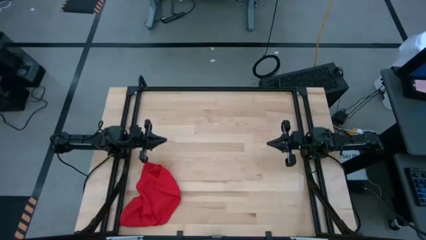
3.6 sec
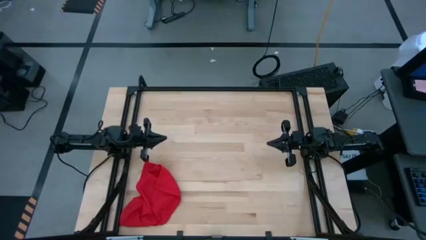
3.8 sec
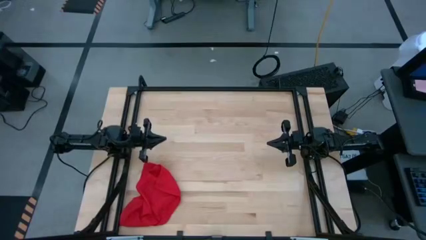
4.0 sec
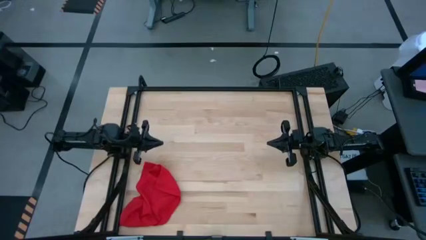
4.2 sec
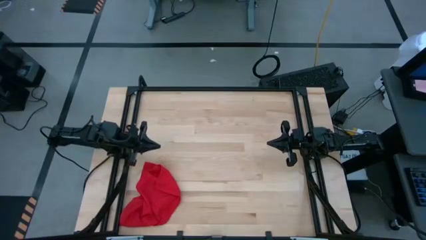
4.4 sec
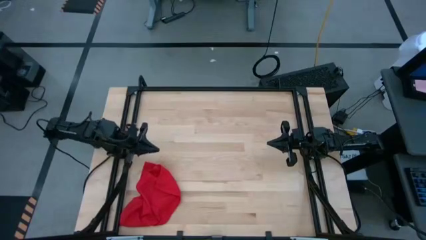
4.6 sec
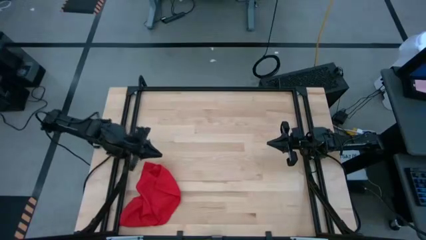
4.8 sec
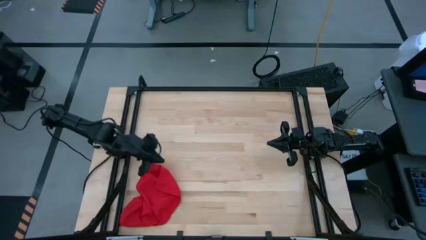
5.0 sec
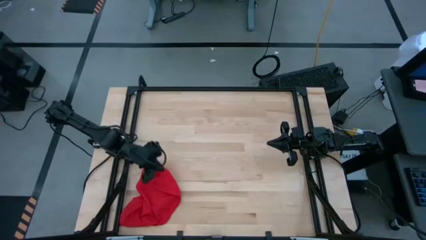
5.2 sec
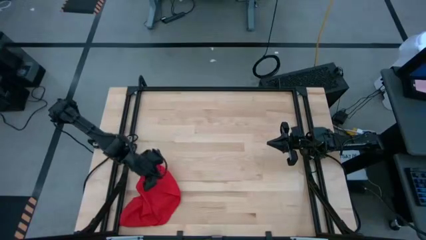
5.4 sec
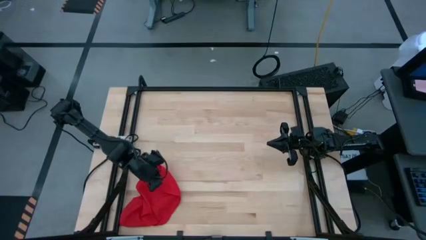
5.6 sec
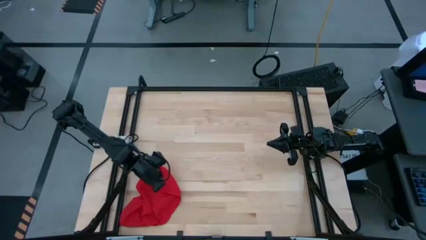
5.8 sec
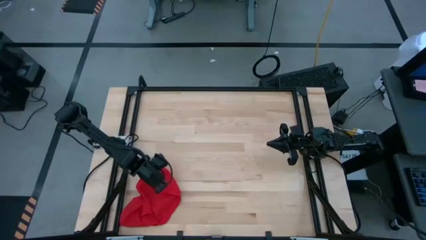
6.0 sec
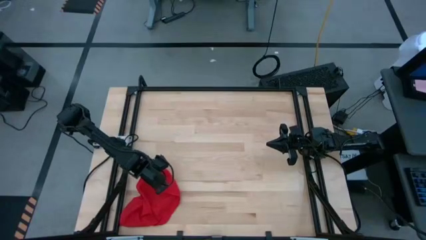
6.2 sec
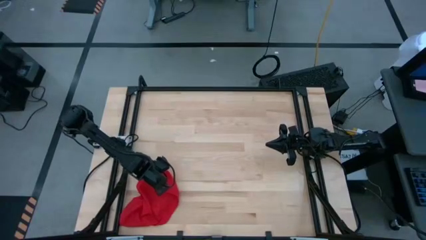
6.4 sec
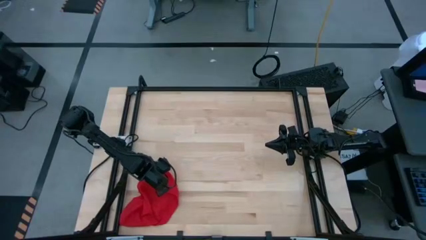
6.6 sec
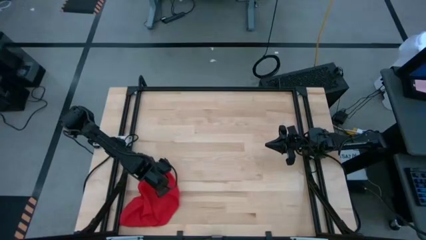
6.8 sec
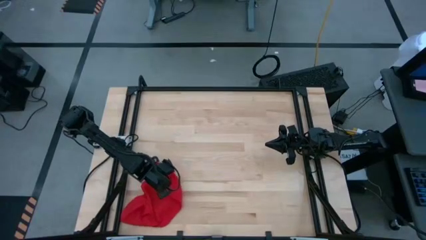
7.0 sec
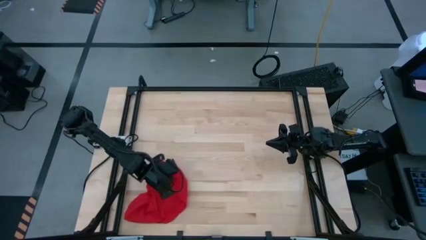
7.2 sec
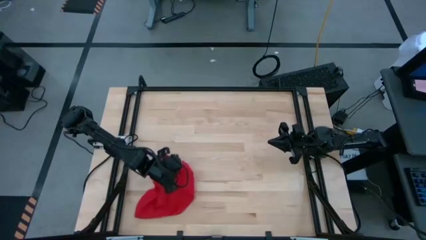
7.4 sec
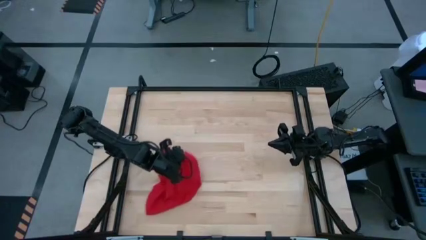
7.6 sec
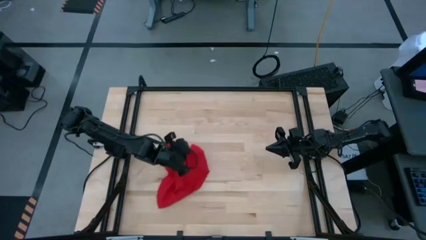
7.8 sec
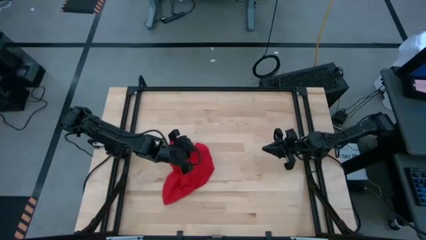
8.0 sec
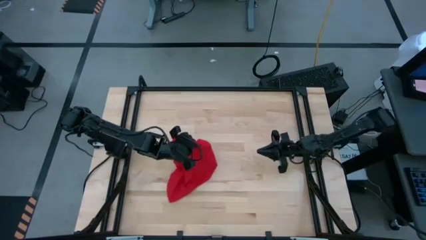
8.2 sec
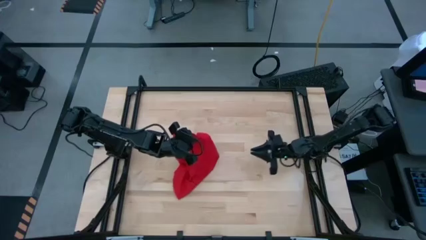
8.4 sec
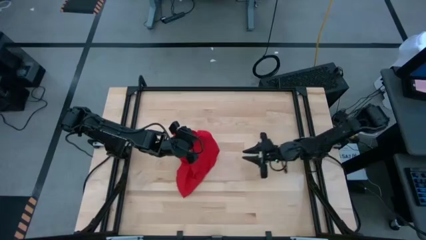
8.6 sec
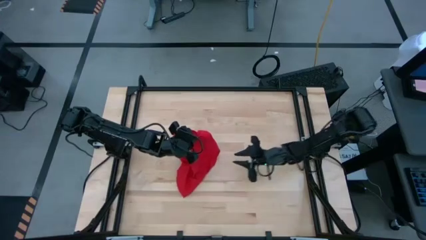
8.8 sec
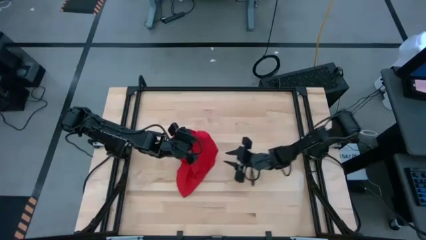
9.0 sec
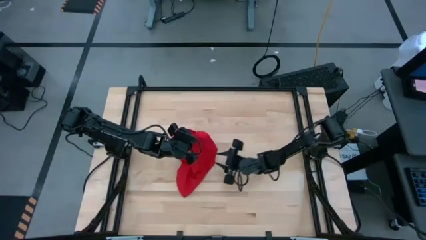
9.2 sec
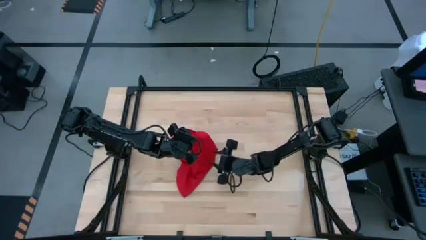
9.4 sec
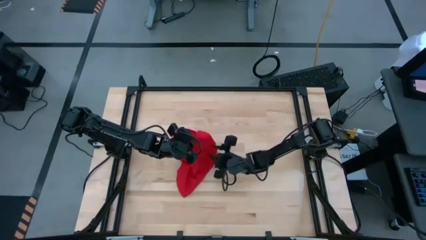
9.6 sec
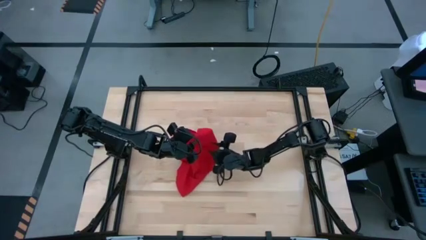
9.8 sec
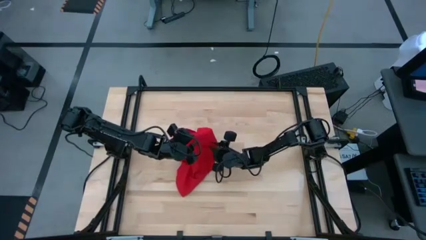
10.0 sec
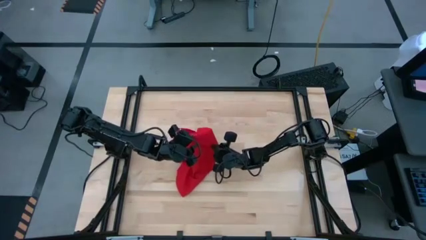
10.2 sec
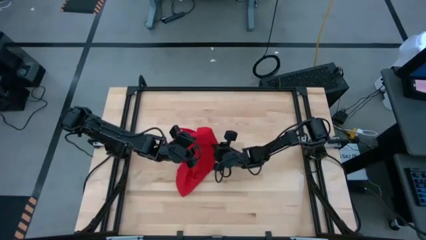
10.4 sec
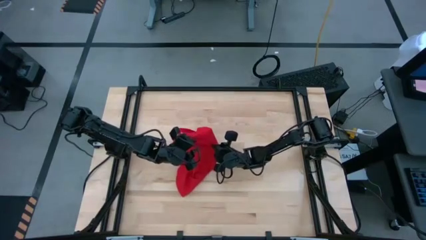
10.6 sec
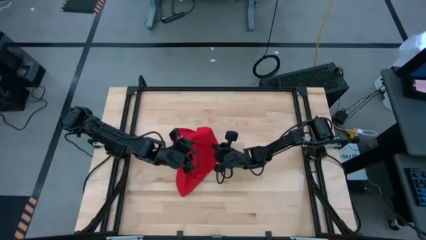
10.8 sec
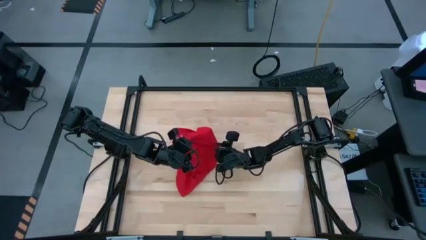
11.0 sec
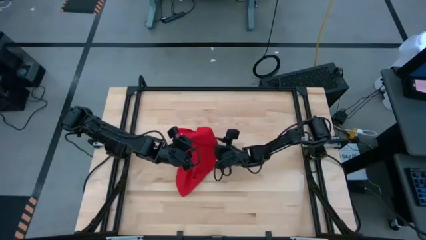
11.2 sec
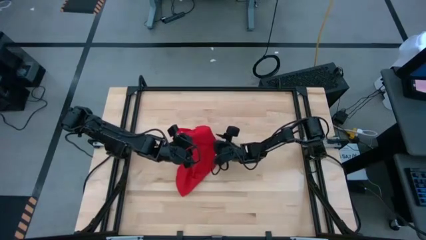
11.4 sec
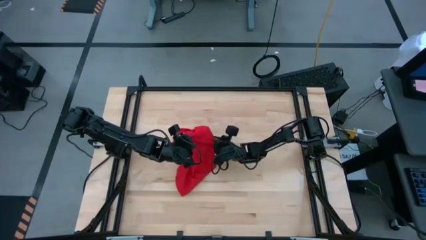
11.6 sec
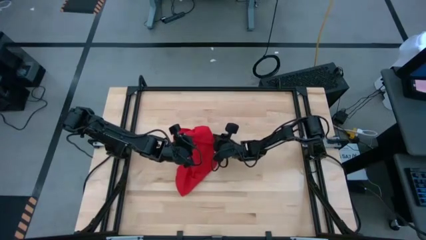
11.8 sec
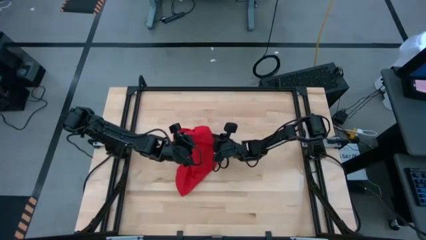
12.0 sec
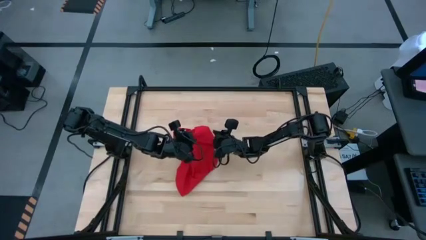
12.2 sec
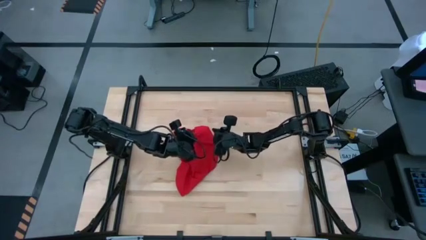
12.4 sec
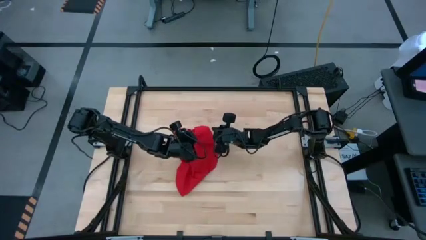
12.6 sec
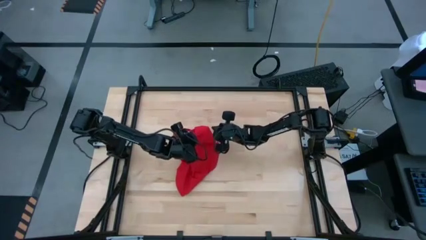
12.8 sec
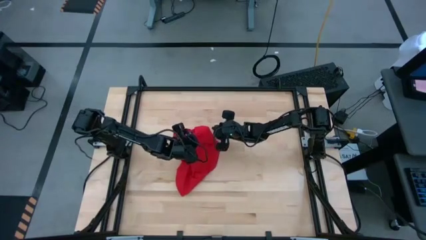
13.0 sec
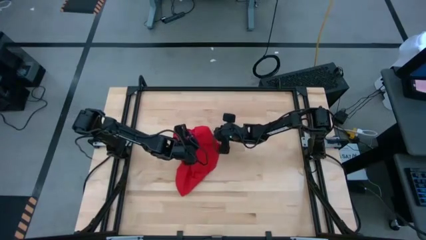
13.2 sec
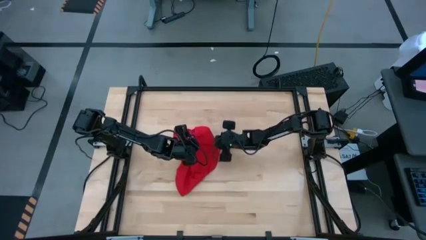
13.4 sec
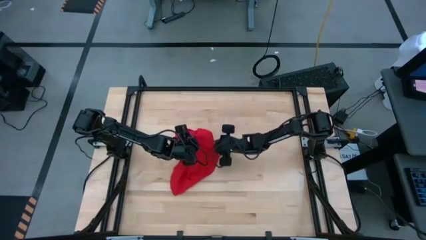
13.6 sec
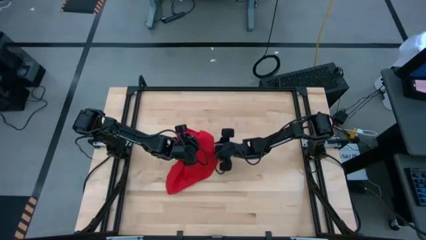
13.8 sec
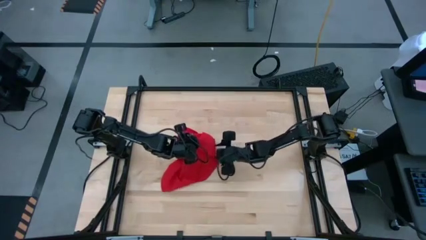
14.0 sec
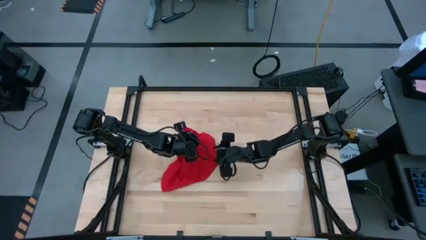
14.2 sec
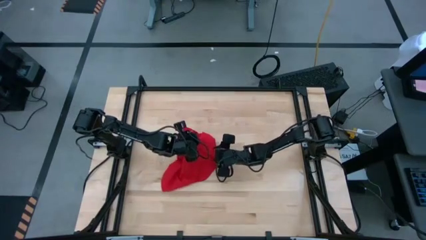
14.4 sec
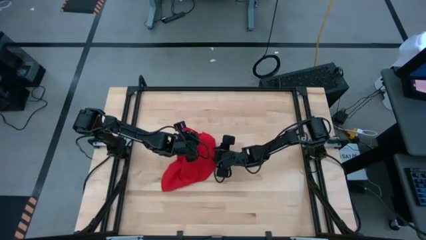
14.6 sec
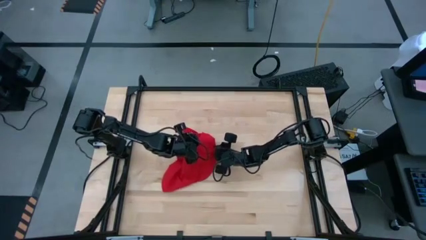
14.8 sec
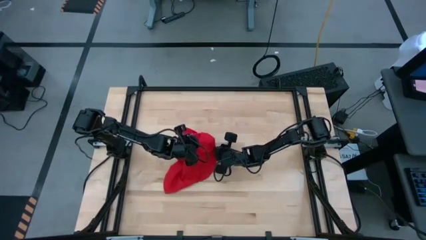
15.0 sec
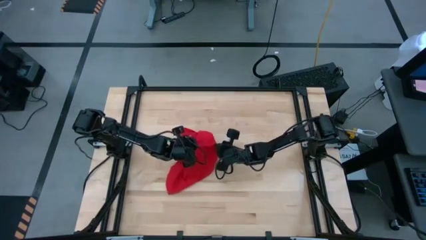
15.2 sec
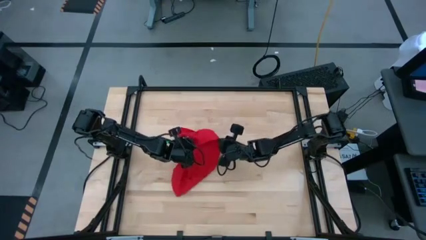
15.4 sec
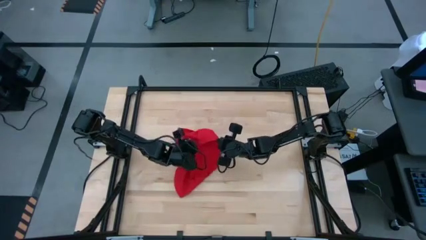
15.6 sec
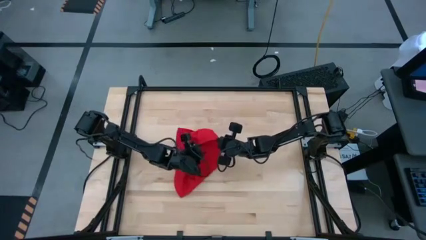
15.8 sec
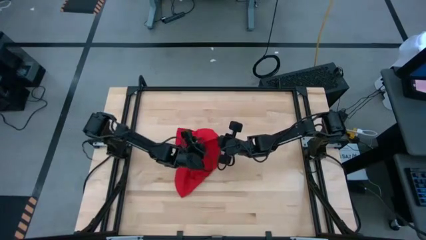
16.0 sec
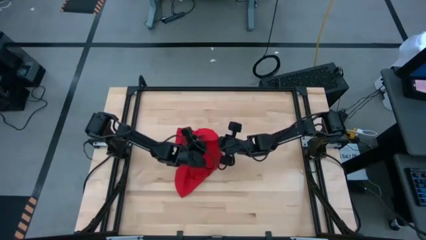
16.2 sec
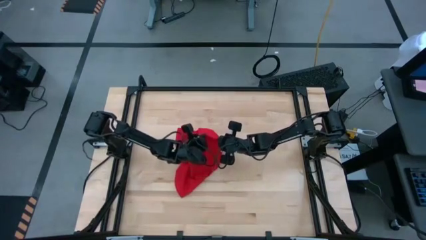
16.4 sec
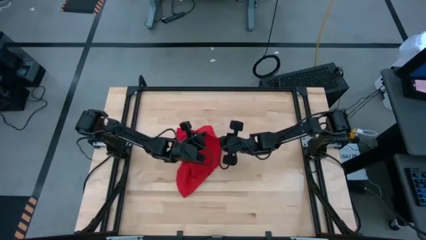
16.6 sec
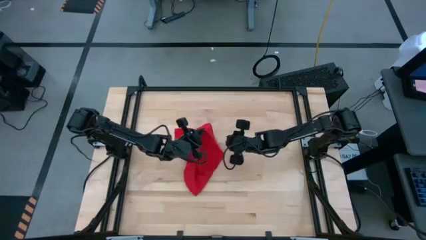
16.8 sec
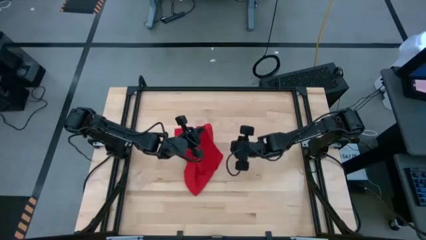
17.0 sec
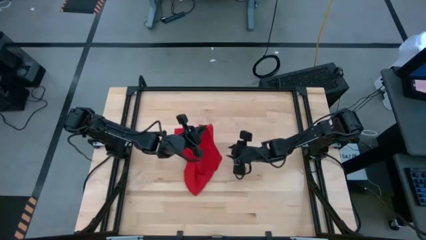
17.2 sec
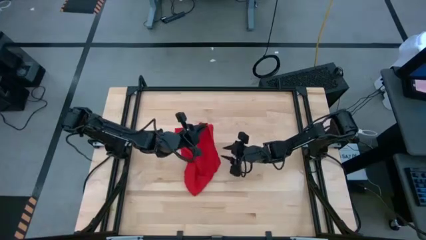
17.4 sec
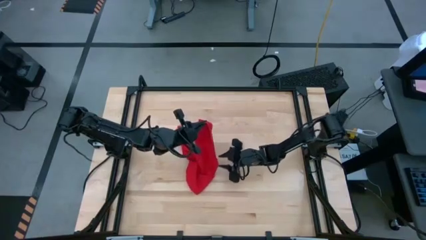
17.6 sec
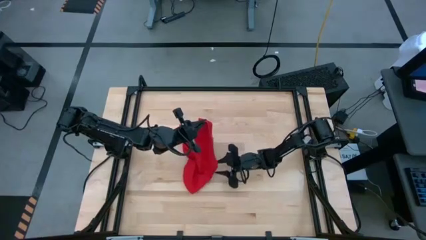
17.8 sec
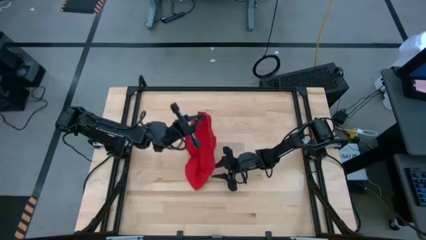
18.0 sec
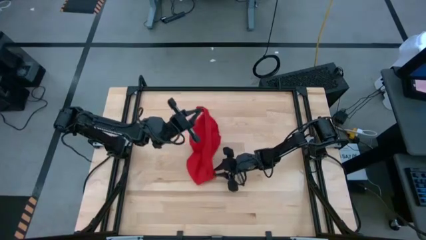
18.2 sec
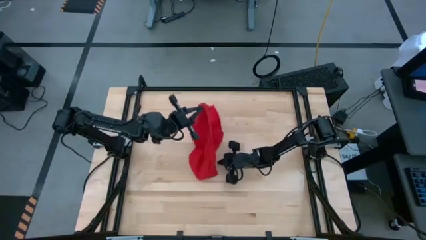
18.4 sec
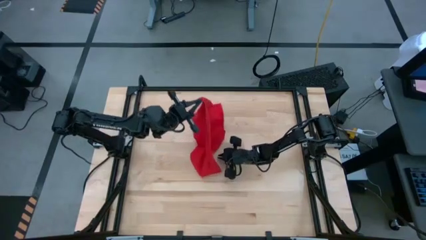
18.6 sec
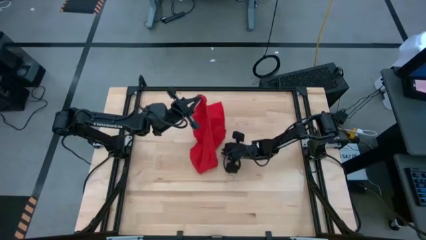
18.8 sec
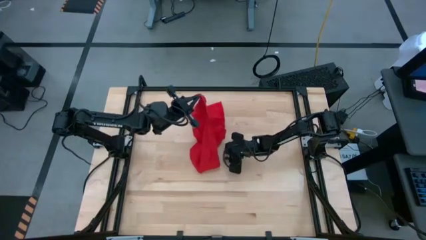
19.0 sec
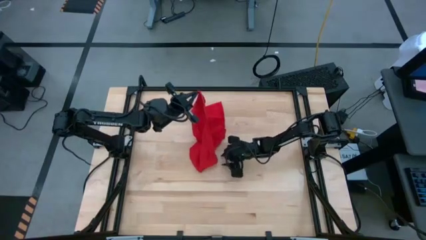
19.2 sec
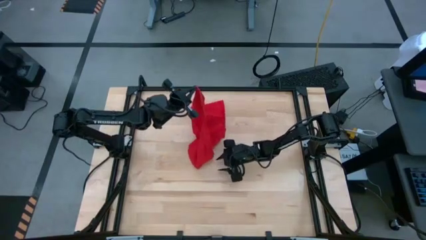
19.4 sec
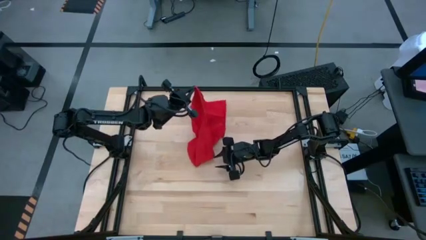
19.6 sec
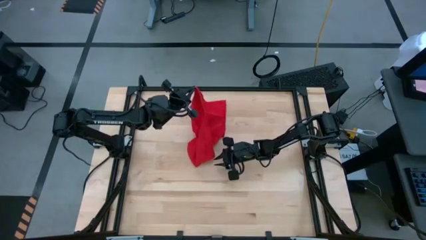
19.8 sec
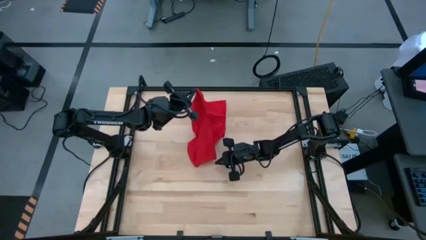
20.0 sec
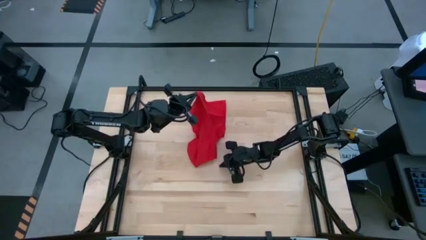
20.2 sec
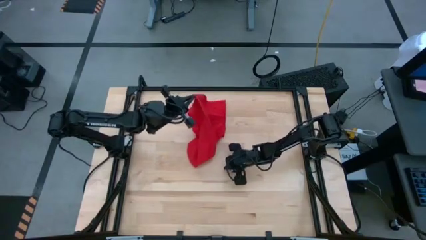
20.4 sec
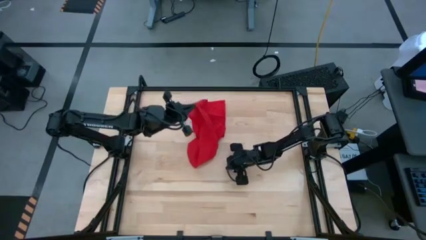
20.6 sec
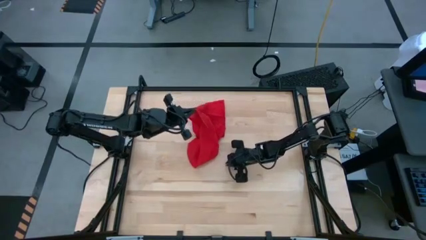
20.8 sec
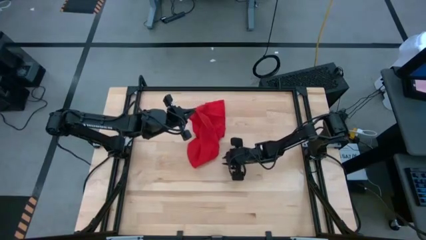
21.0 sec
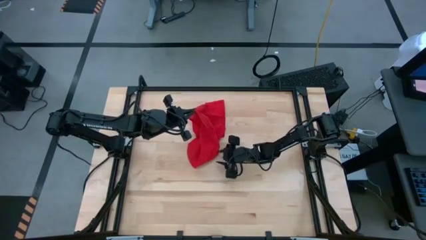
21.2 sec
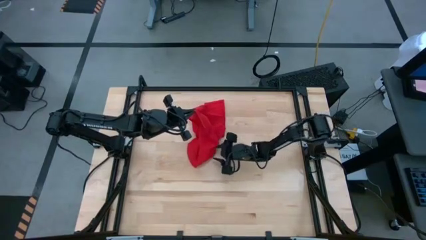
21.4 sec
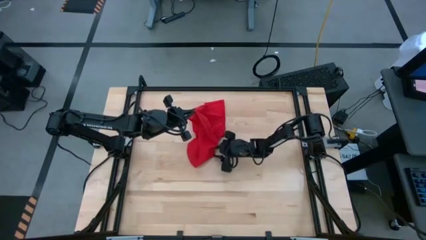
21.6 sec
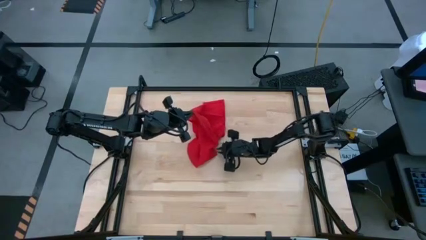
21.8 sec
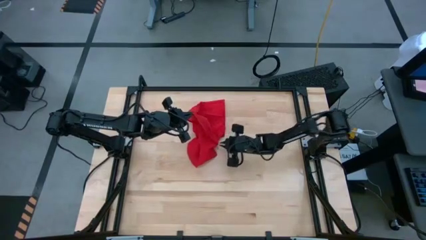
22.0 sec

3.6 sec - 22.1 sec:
Task: Roll napkin
Fold the red napkin
